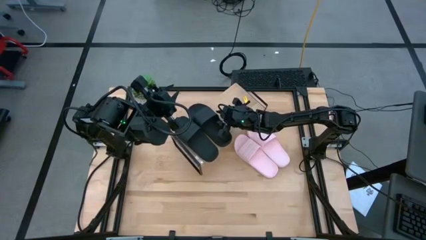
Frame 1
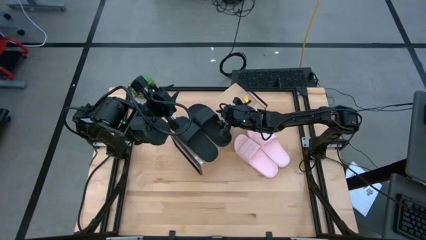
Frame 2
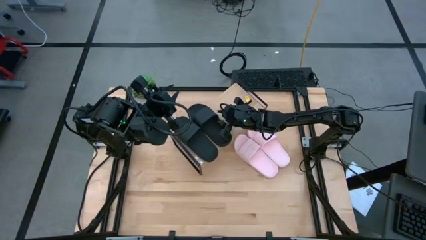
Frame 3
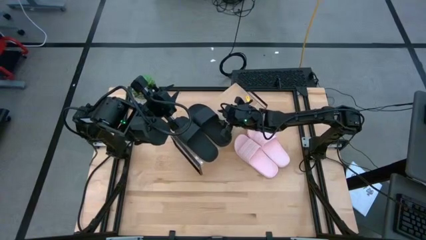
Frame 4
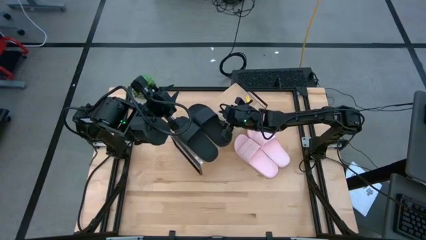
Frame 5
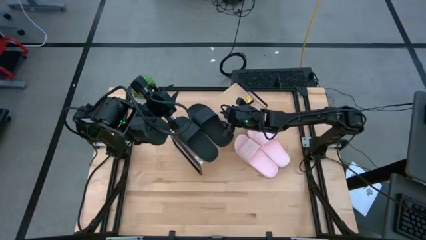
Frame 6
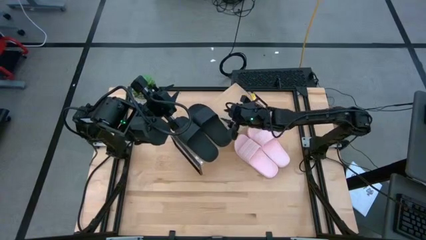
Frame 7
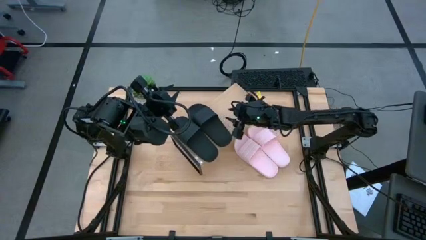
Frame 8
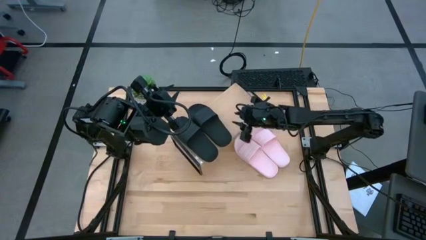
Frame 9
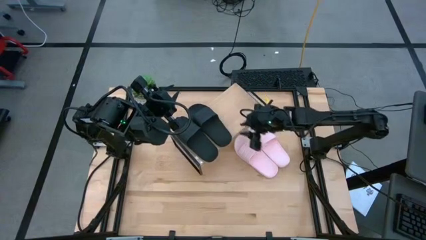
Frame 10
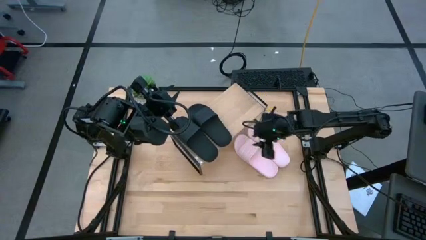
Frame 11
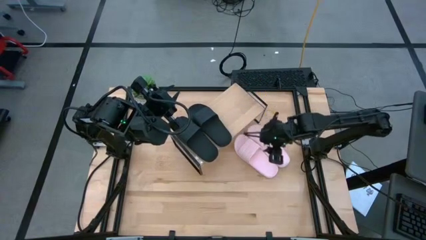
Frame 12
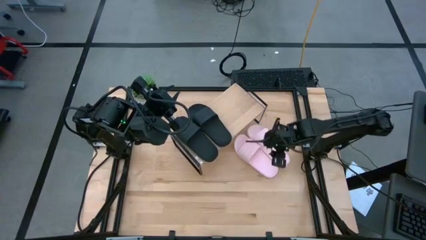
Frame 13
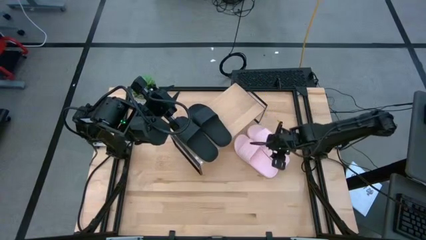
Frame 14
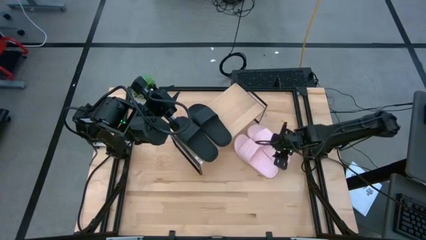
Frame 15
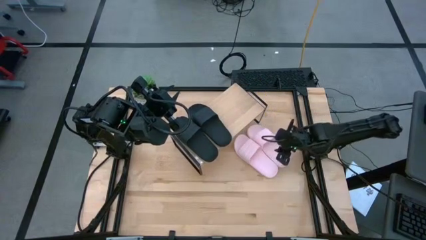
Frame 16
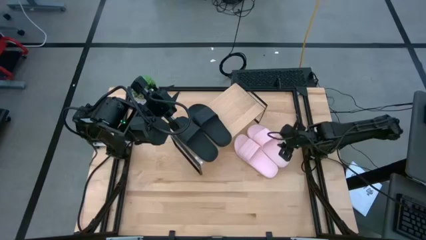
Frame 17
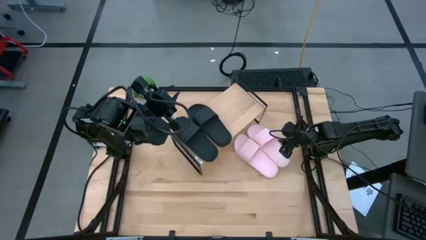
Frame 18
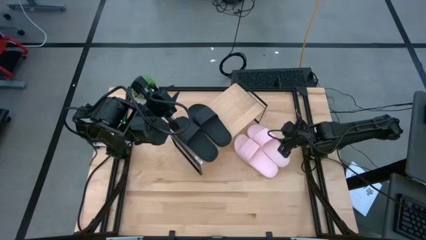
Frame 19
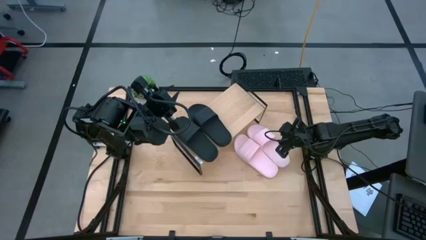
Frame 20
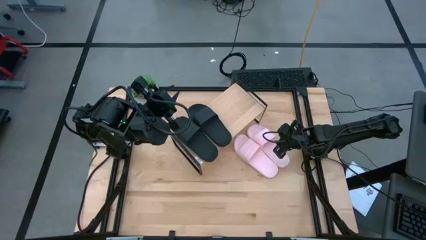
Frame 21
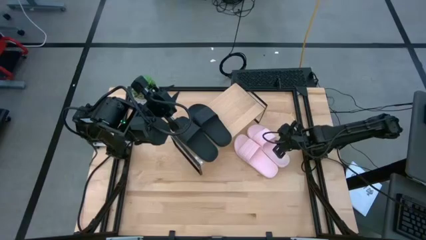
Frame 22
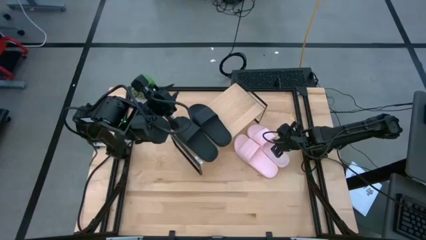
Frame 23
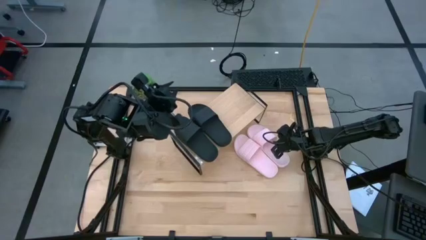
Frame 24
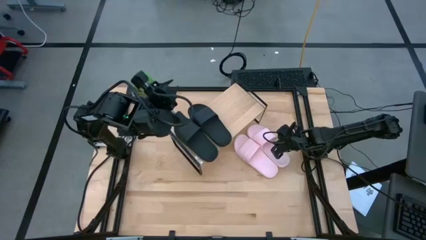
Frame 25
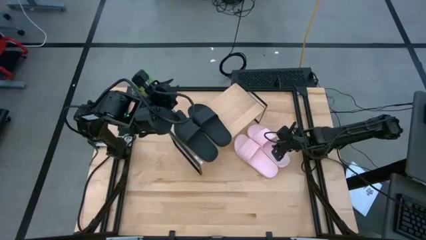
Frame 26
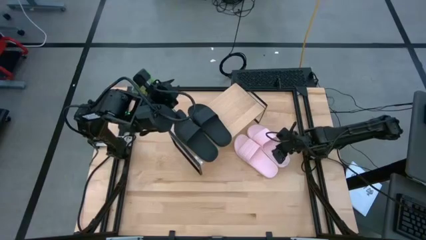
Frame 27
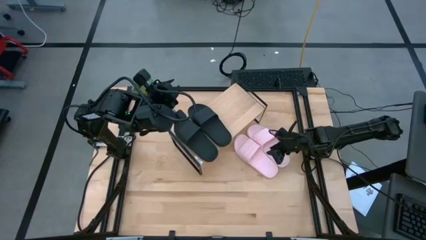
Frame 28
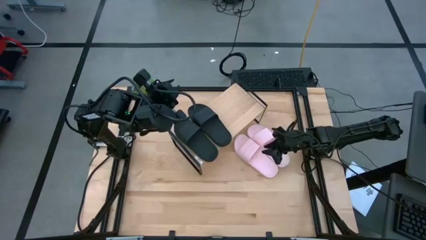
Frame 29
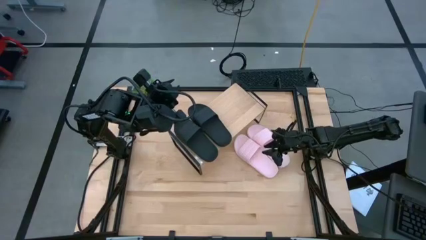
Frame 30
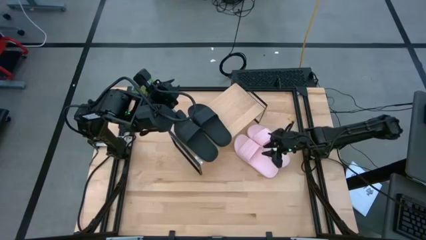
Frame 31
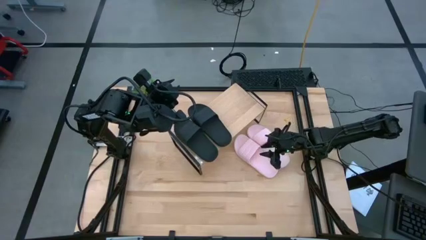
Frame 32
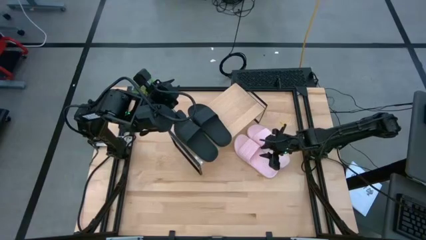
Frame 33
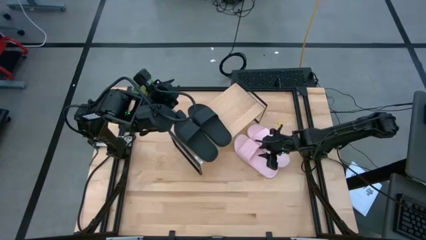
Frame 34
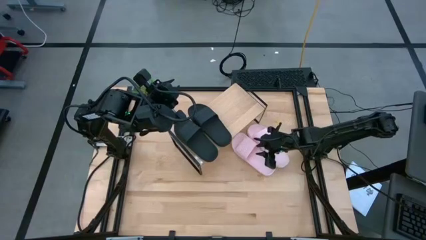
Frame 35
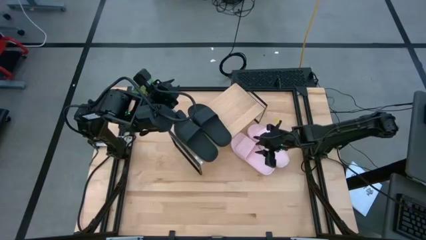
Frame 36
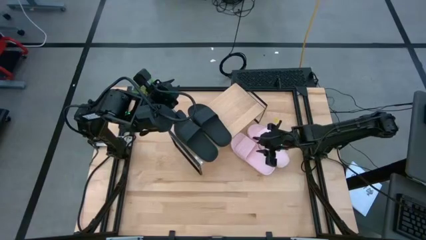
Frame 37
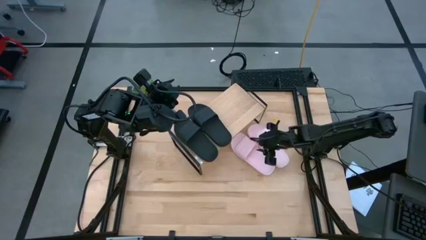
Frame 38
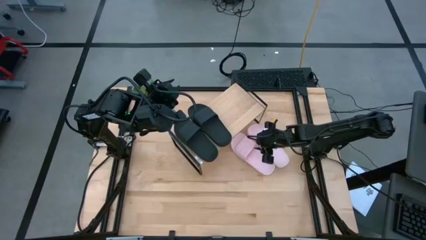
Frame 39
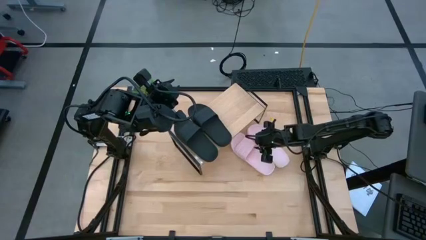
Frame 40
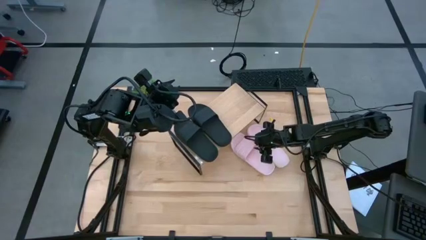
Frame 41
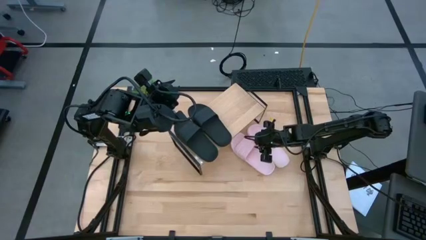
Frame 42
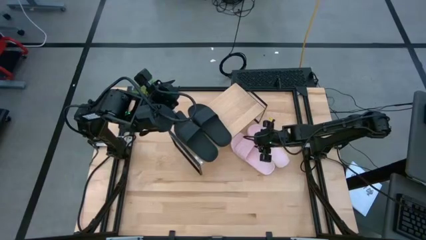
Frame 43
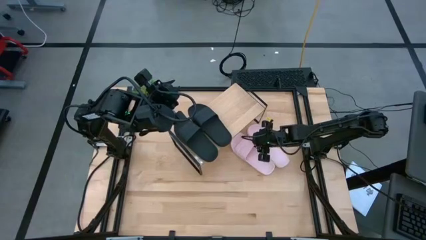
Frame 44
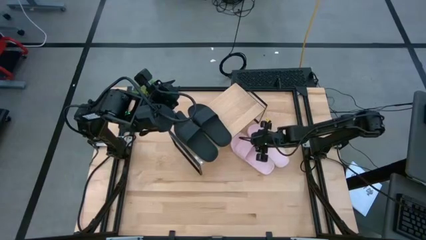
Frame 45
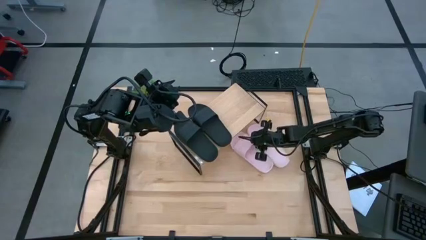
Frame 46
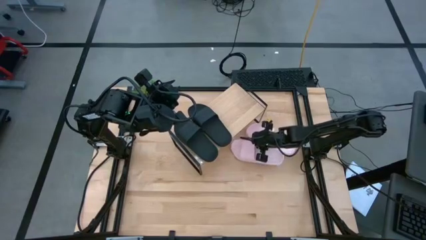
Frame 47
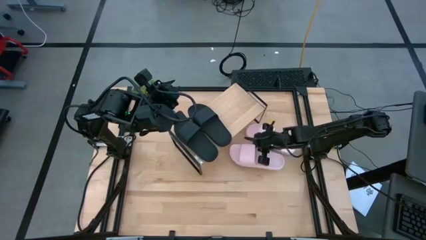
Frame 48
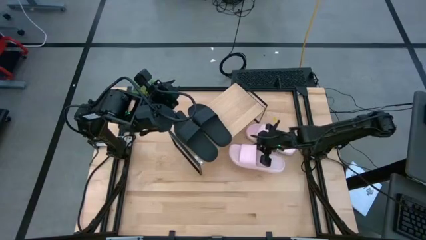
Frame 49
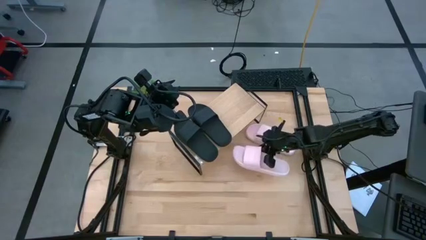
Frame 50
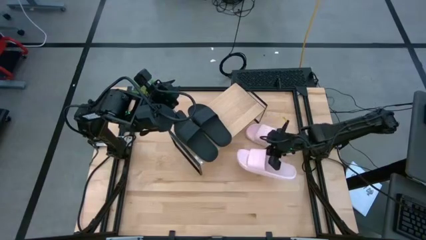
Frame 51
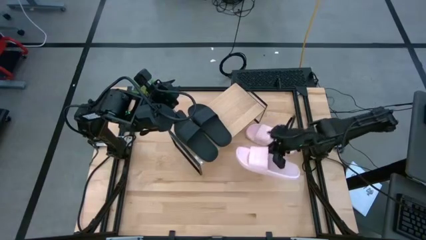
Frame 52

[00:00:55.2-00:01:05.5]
Task: Pick and place slides into the shelf
Put the left pink slide on the shelf
